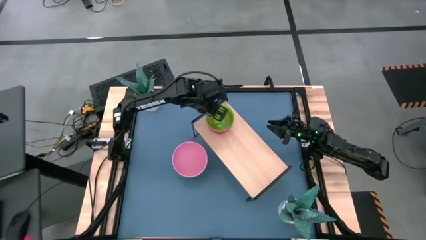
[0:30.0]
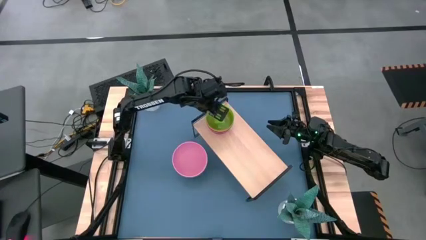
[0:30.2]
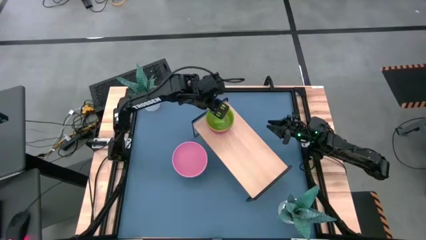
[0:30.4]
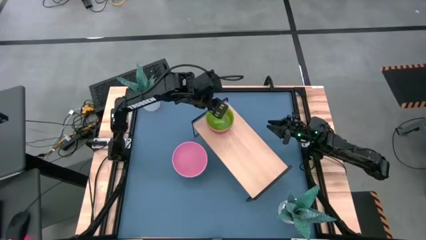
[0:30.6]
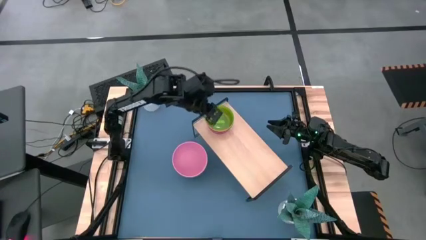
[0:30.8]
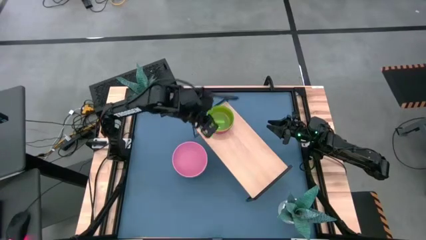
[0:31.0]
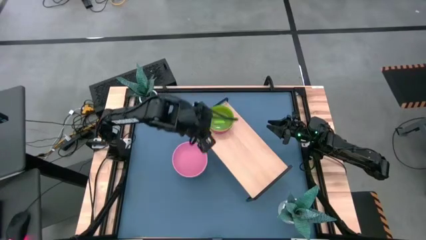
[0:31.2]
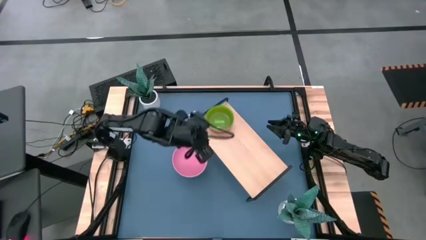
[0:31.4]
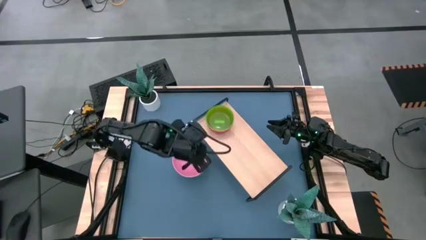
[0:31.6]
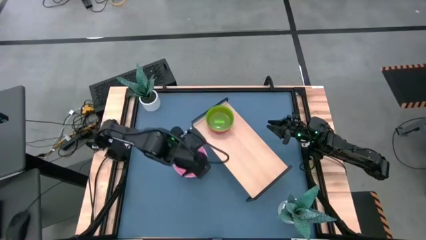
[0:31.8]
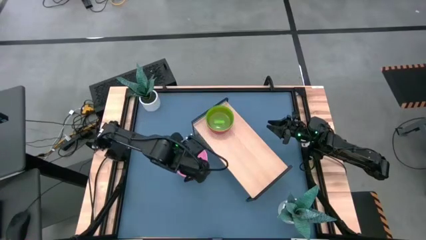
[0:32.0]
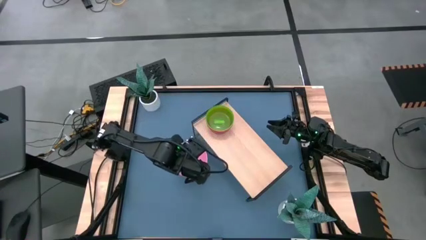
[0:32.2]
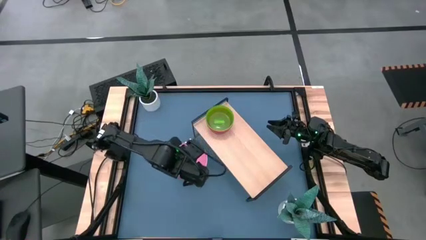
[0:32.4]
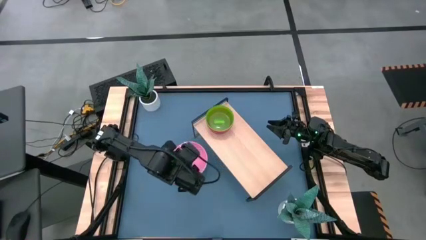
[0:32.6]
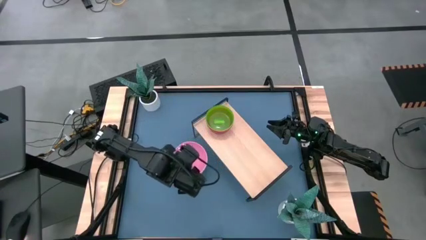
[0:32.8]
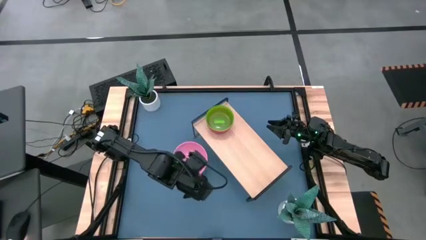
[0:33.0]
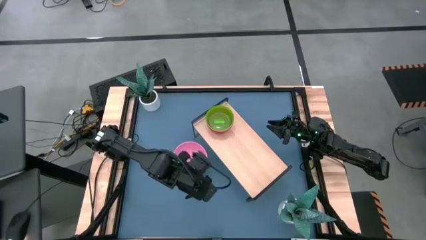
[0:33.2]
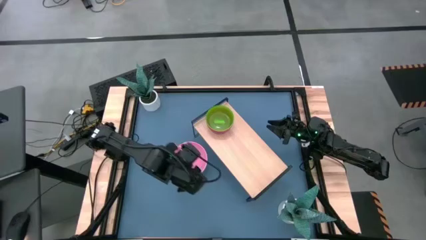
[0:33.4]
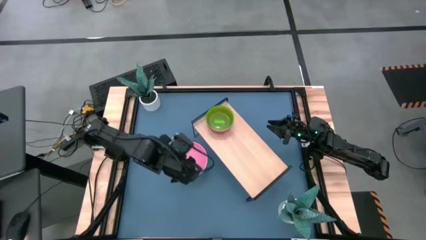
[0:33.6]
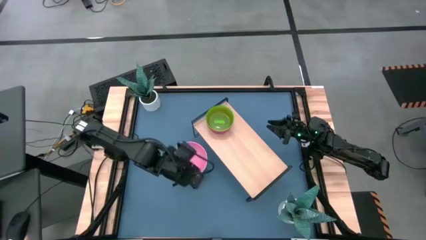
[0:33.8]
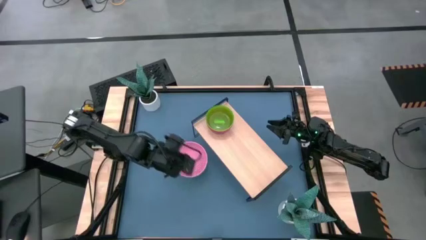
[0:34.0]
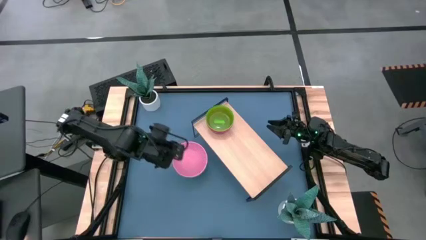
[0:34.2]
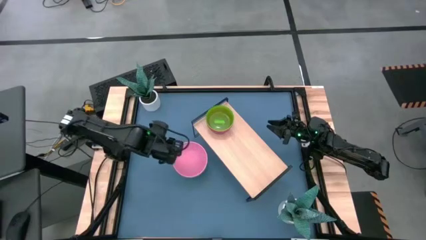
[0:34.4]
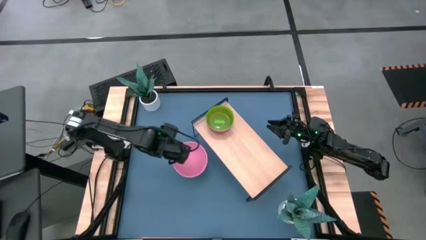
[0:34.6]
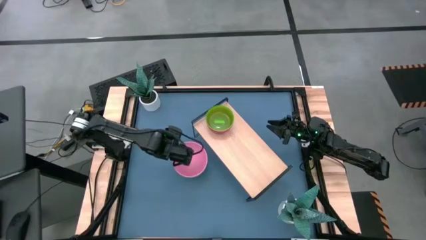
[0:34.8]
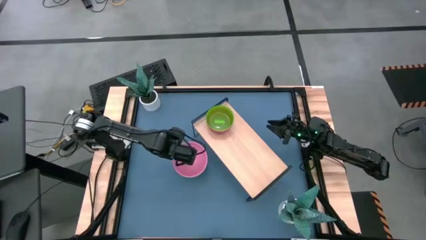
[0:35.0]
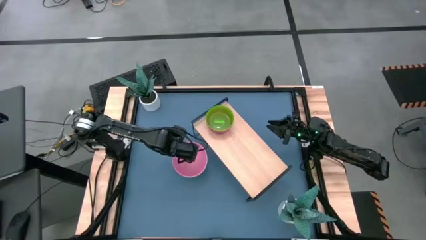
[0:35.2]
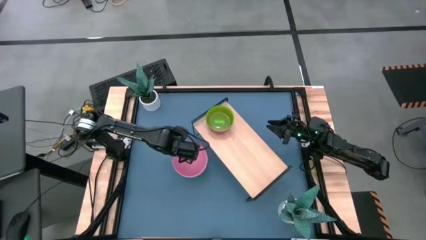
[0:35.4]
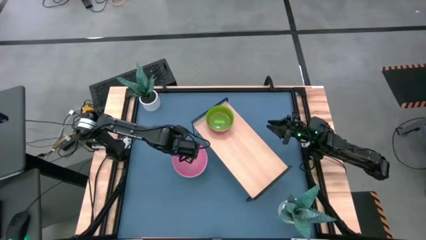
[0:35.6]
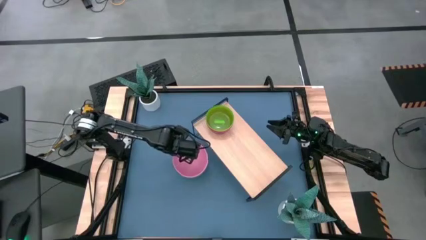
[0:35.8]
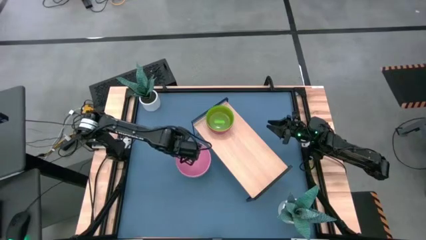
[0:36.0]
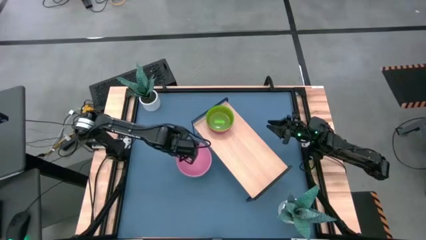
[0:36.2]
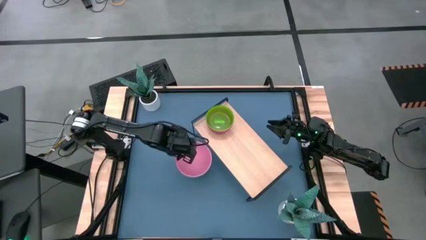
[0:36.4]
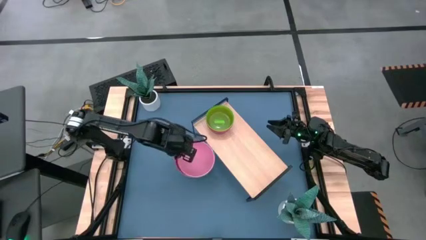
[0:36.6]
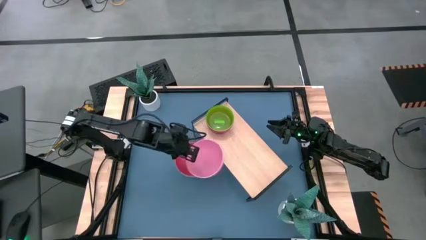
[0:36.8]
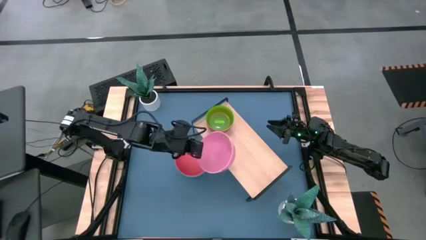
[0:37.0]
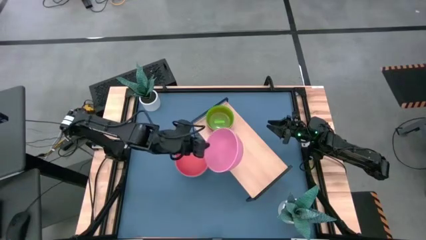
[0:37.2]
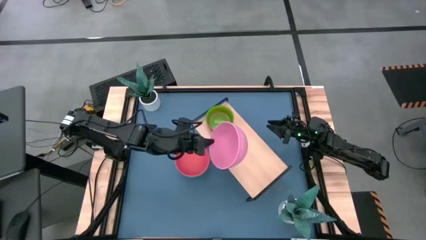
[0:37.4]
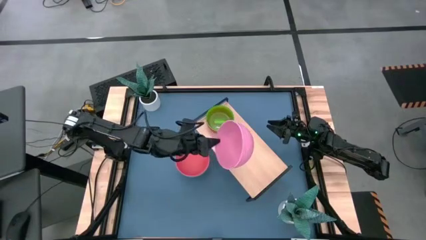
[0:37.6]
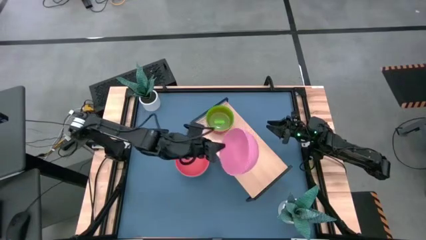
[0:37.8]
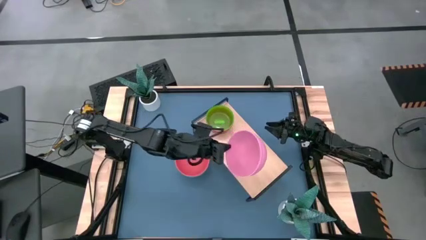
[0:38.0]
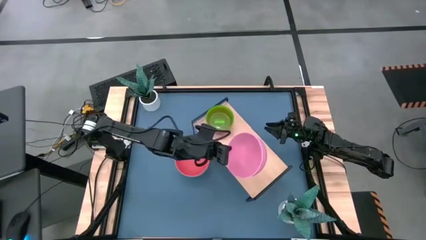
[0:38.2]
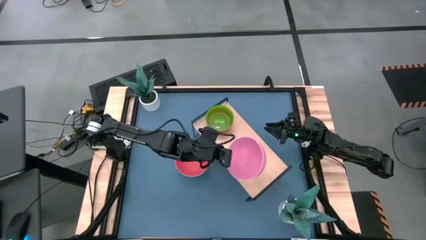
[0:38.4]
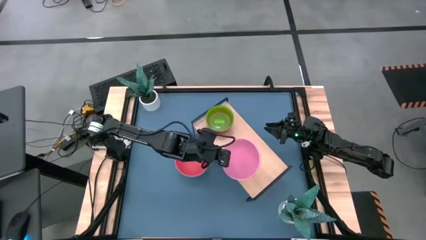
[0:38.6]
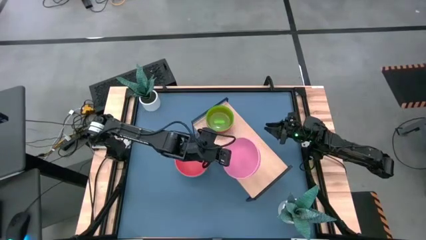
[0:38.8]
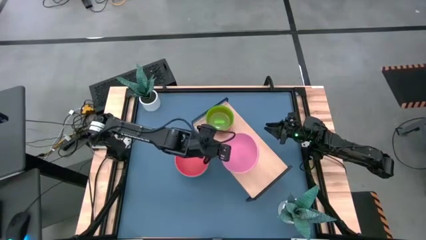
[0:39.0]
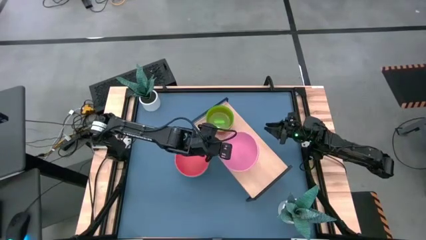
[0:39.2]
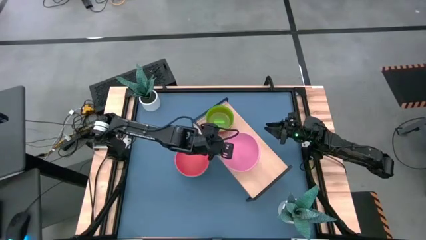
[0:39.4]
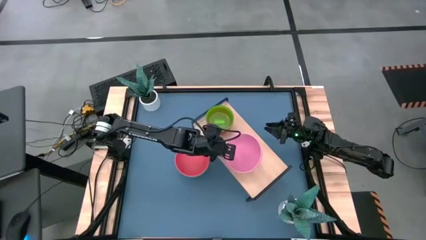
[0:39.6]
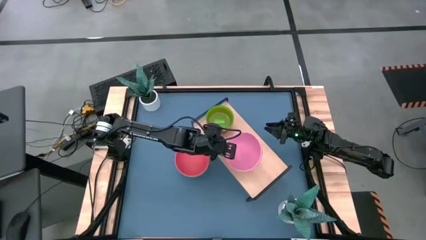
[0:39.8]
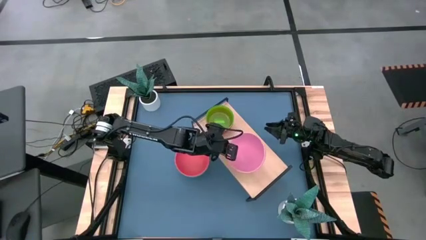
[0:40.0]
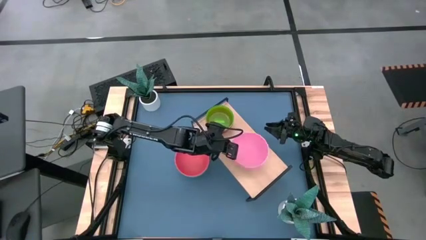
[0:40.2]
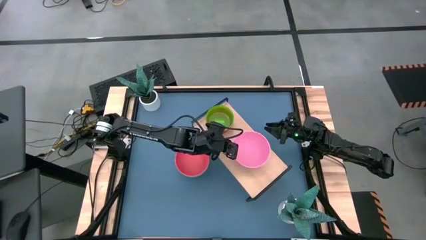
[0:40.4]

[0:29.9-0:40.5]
Task: Place and stack bowls onto a shelf
Put the pink bowl on the shelf

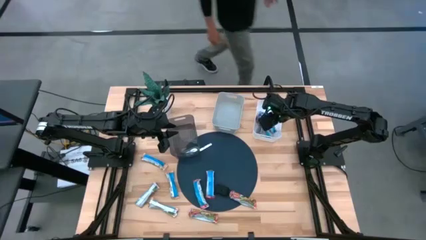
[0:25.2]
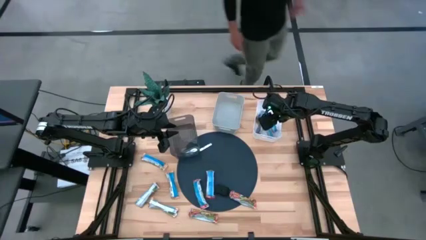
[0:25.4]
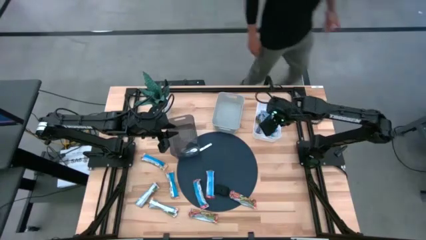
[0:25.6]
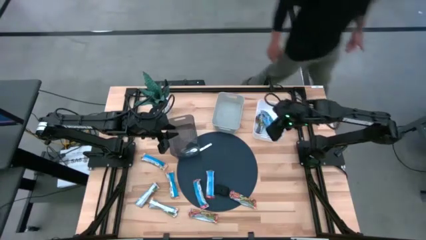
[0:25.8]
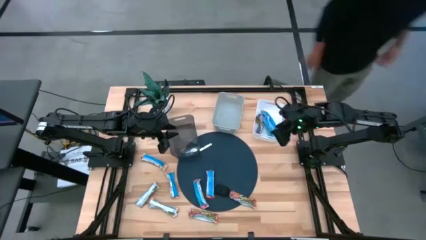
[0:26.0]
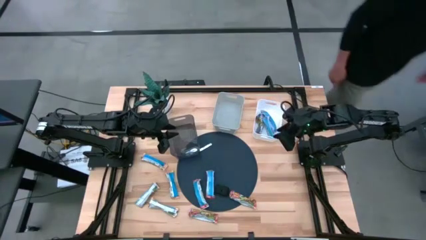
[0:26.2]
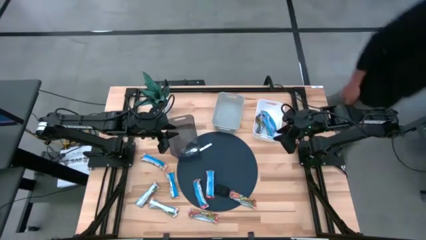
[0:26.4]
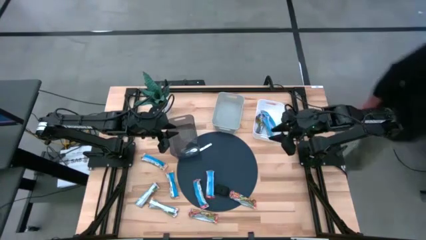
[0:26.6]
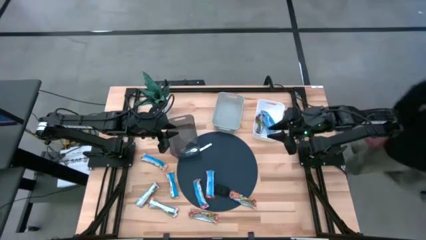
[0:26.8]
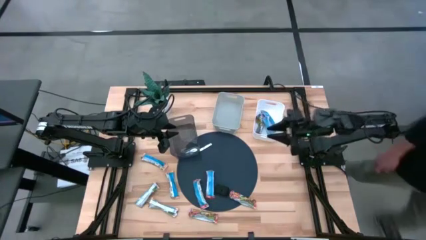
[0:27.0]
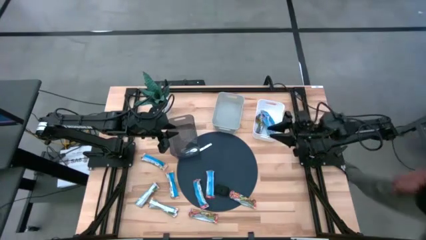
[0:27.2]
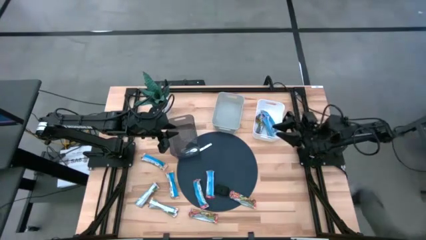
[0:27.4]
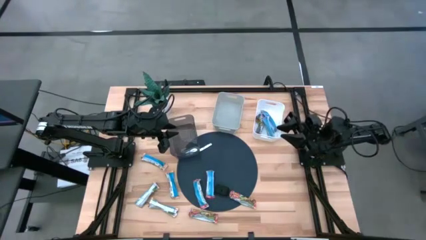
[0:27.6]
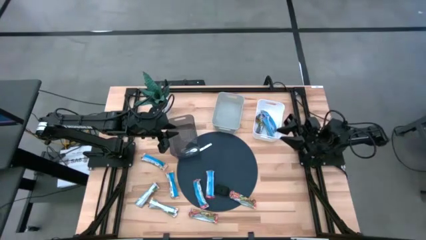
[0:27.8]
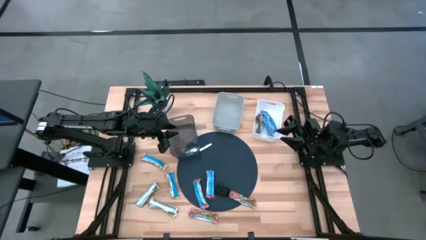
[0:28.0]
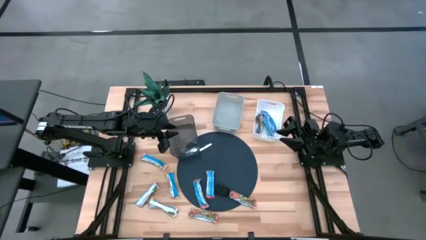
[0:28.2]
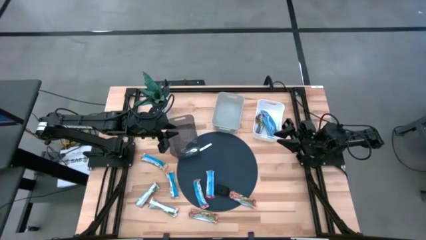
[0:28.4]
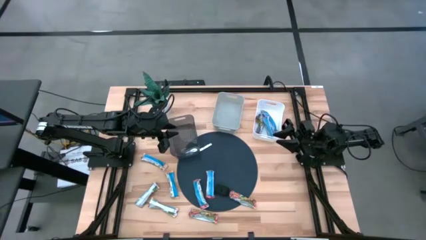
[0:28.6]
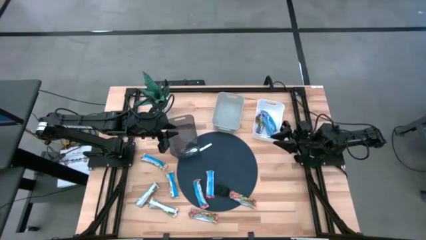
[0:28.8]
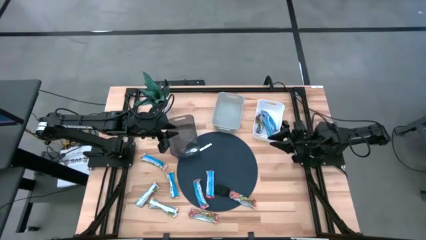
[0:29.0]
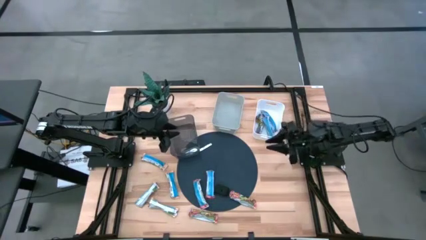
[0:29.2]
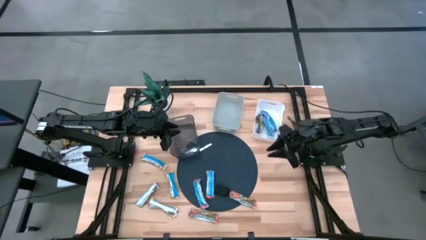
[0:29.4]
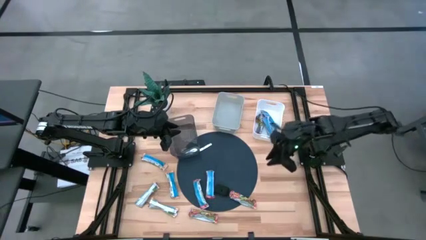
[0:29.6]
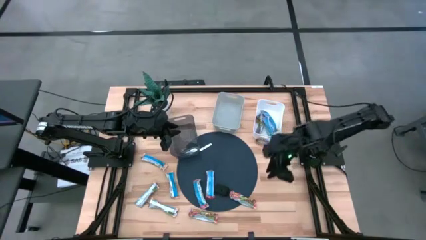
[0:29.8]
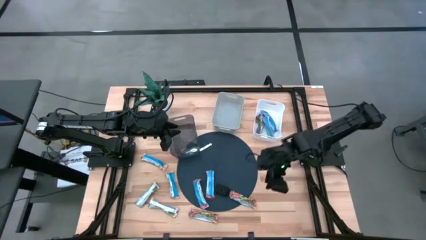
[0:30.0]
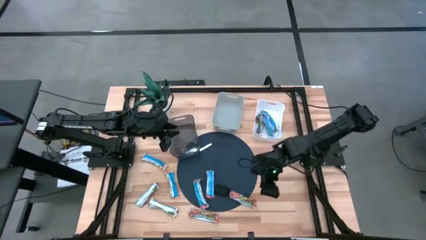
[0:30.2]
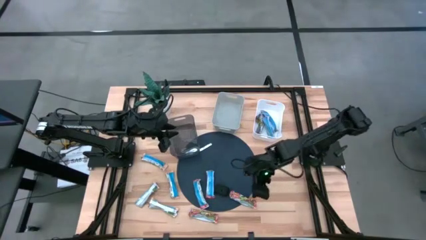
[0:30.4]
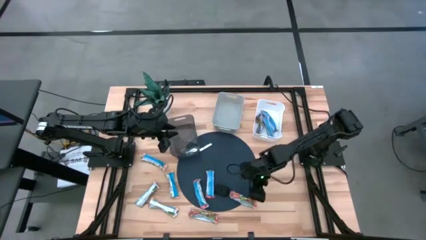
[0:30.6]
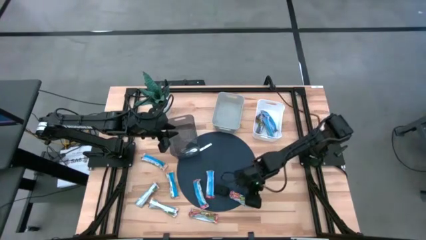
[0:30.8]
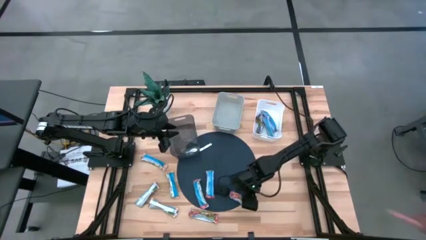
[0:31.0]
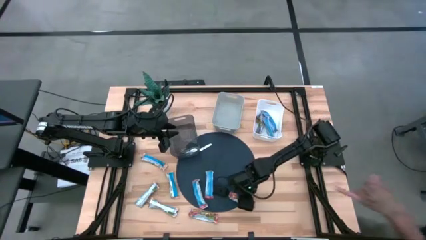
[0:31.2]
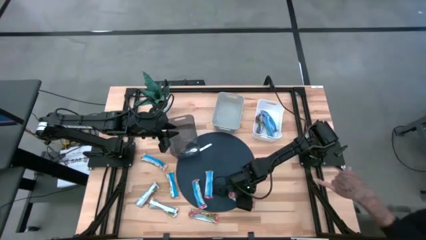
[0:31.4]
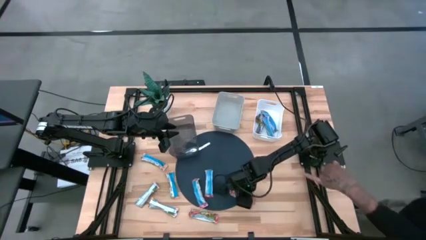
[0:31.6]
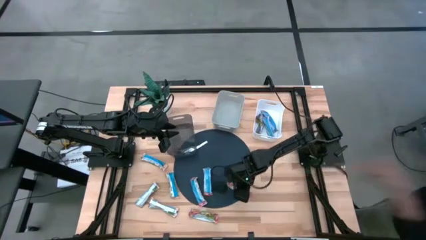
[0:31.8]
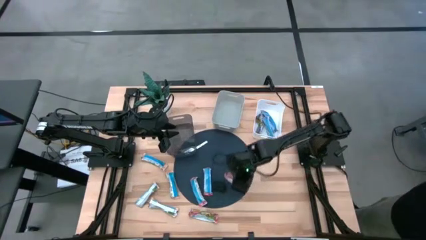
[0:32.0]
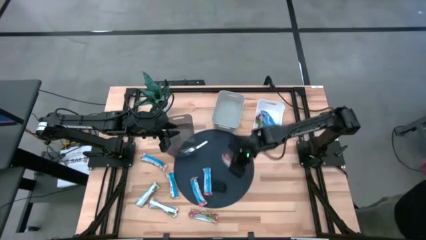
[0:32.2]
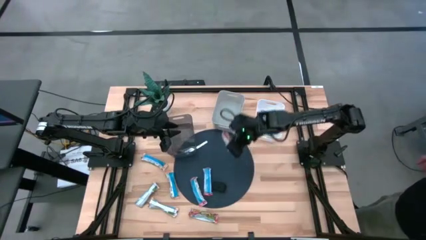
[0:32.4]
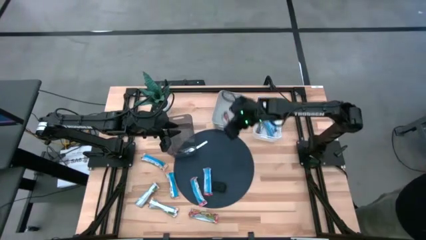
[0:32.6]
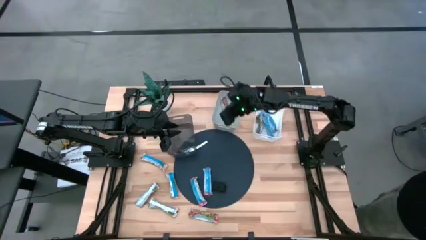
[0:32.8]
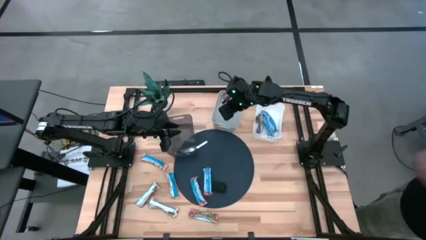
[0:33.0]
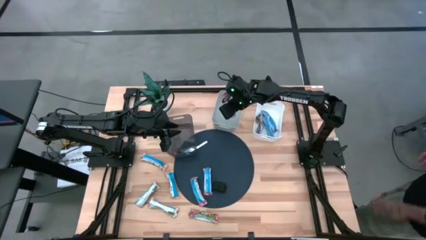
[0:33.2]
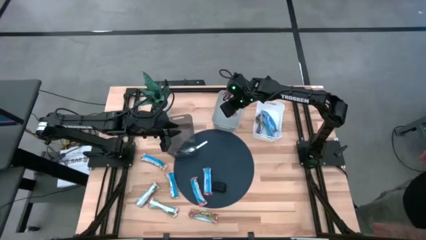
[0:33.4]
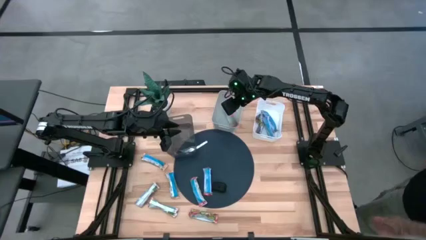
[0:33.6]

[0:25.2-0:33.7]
Task: Pick and place Granola Bars by type
Put the red granola bar into the gray bin
